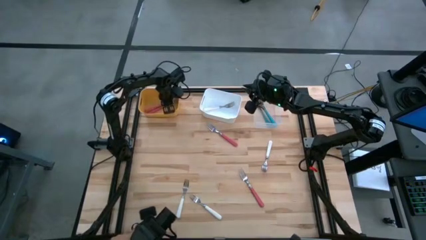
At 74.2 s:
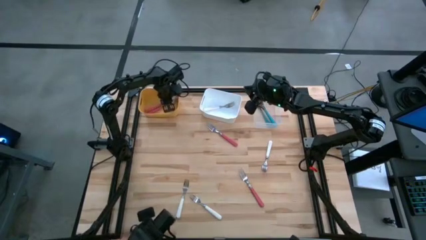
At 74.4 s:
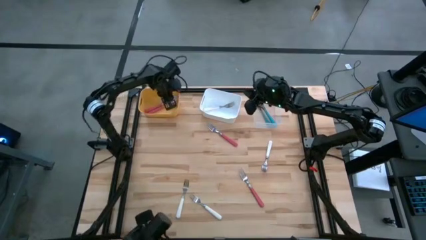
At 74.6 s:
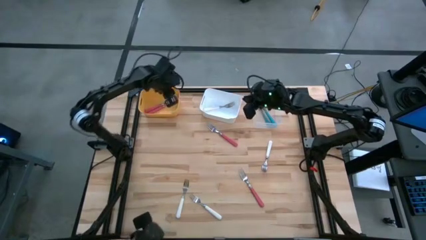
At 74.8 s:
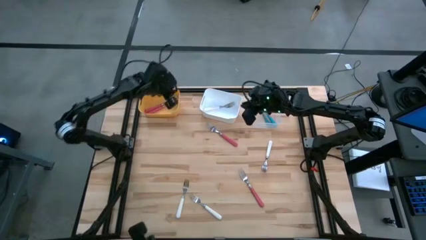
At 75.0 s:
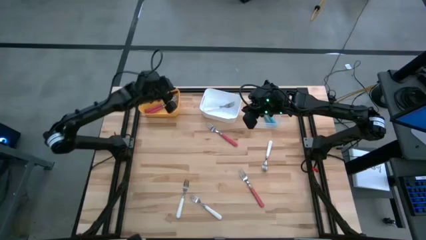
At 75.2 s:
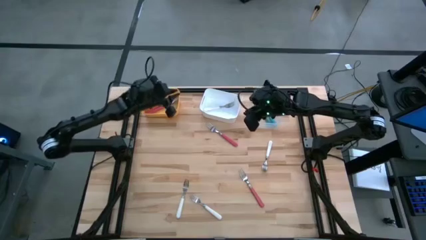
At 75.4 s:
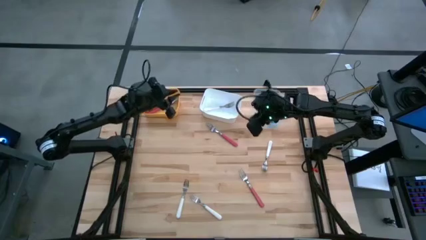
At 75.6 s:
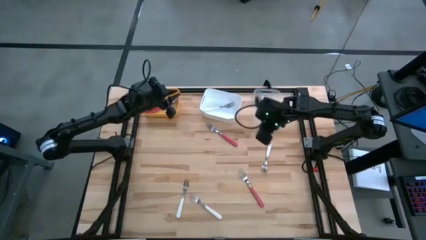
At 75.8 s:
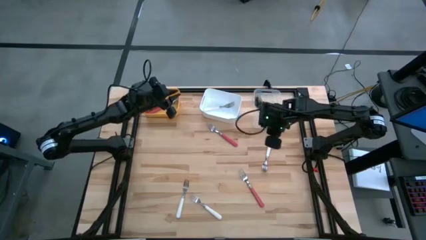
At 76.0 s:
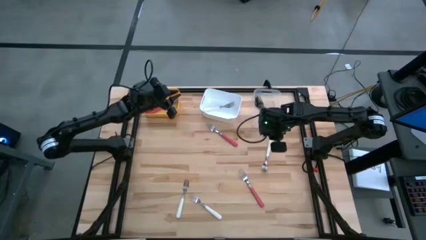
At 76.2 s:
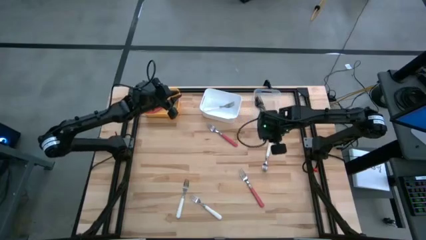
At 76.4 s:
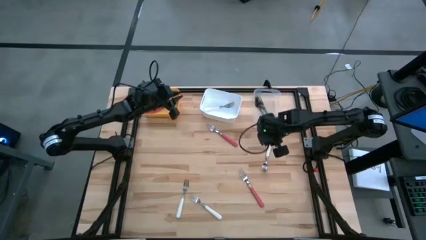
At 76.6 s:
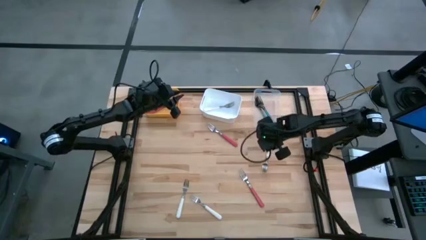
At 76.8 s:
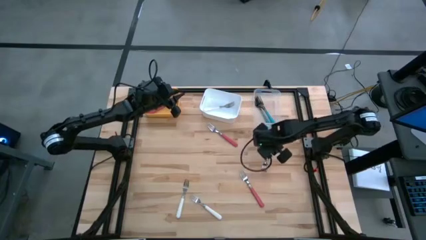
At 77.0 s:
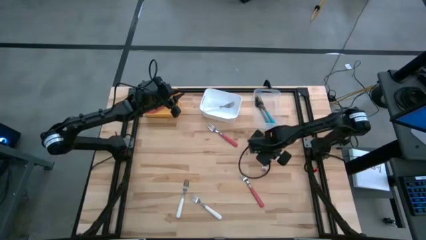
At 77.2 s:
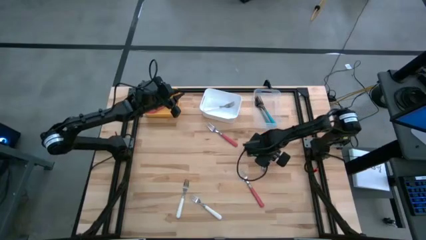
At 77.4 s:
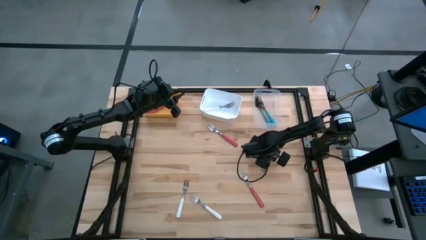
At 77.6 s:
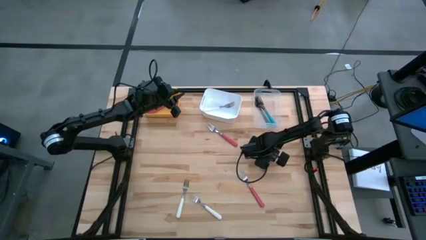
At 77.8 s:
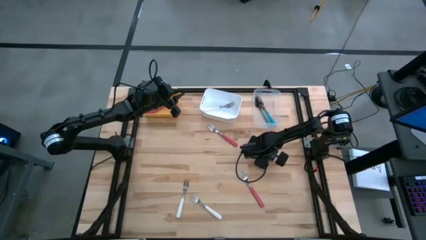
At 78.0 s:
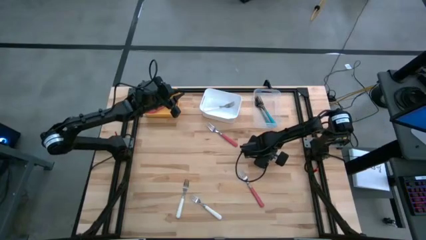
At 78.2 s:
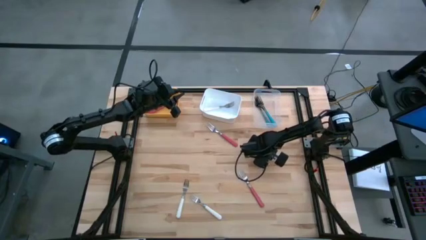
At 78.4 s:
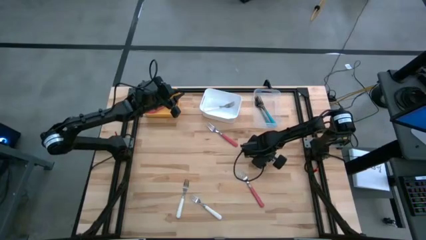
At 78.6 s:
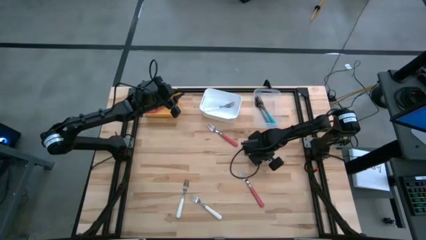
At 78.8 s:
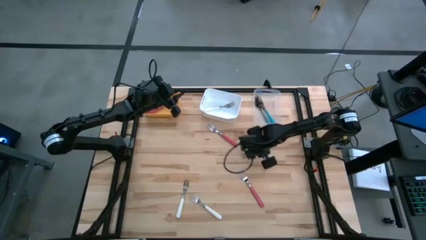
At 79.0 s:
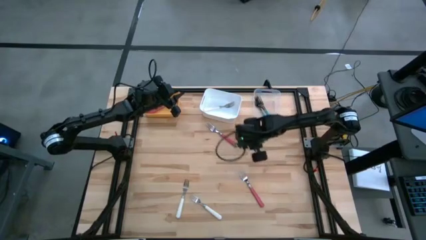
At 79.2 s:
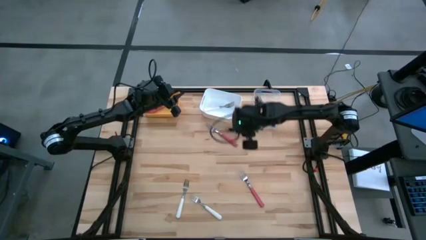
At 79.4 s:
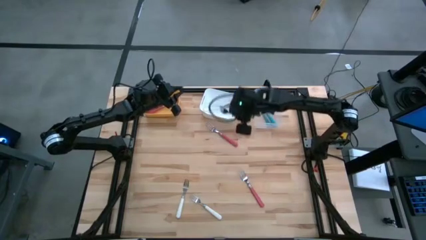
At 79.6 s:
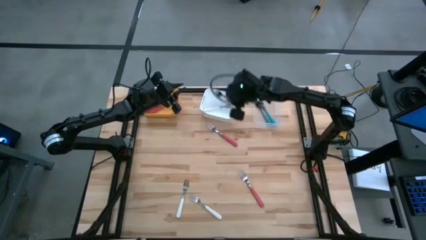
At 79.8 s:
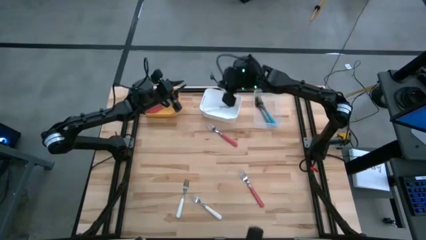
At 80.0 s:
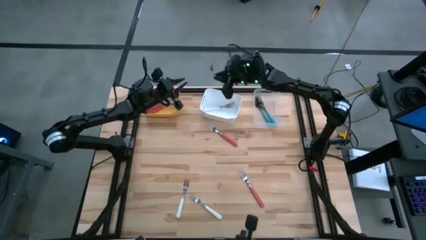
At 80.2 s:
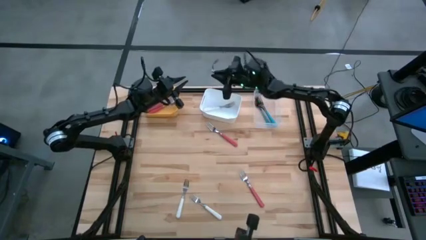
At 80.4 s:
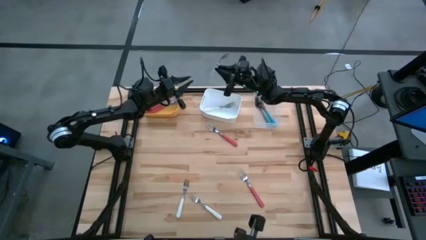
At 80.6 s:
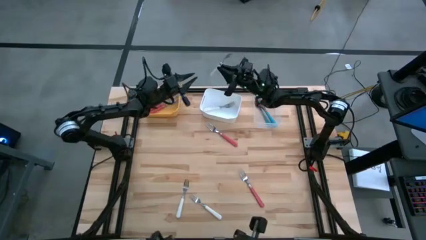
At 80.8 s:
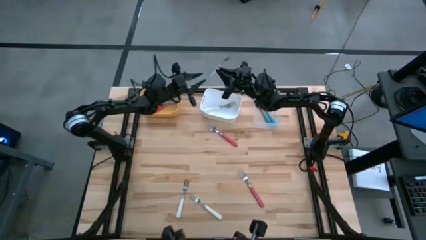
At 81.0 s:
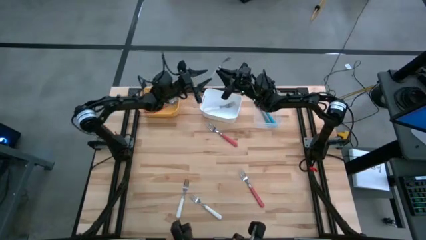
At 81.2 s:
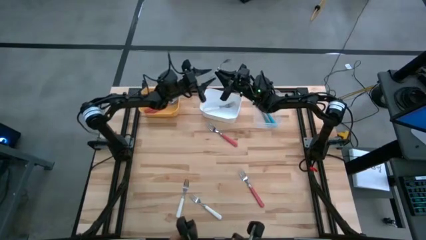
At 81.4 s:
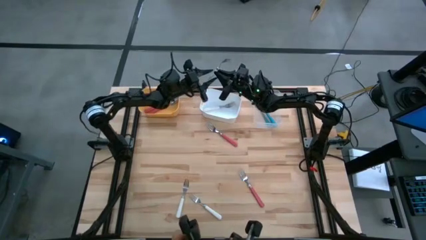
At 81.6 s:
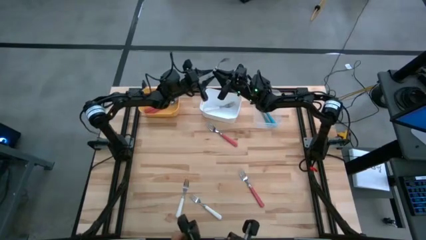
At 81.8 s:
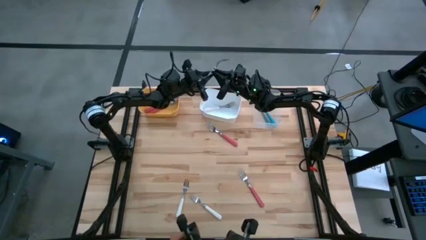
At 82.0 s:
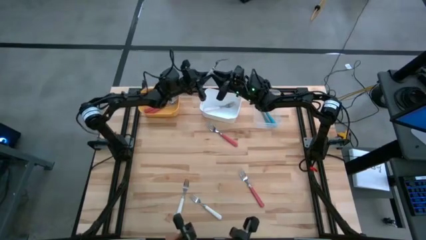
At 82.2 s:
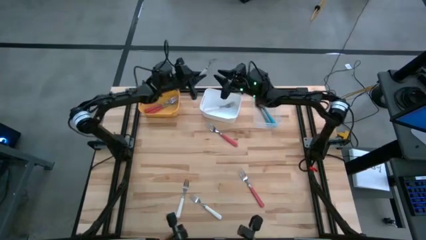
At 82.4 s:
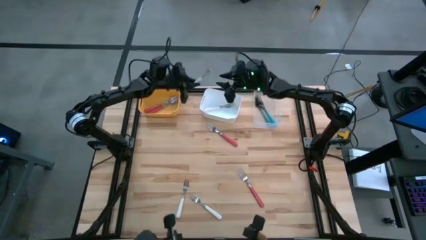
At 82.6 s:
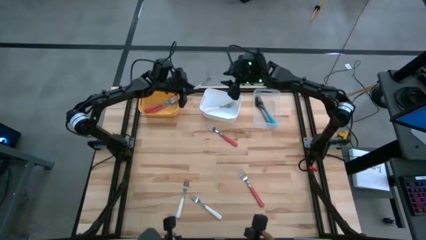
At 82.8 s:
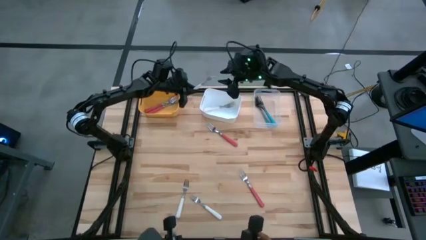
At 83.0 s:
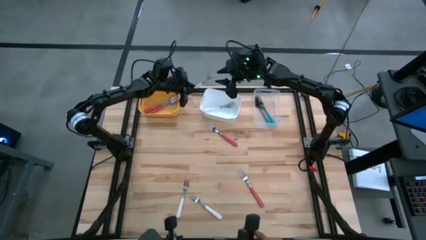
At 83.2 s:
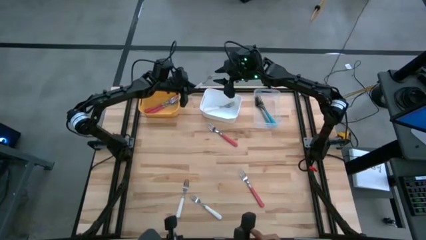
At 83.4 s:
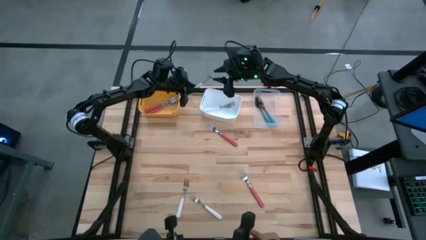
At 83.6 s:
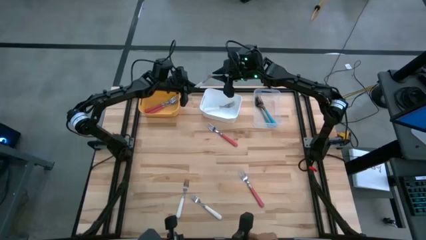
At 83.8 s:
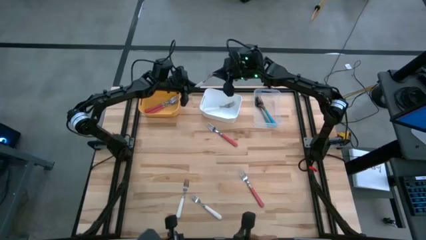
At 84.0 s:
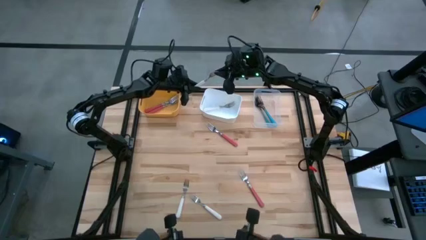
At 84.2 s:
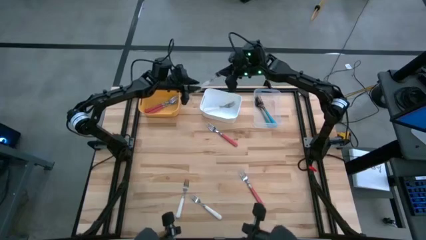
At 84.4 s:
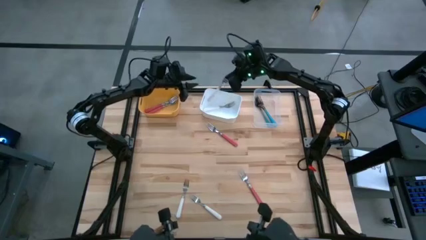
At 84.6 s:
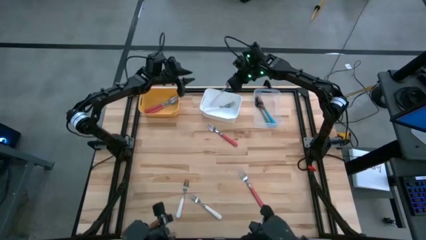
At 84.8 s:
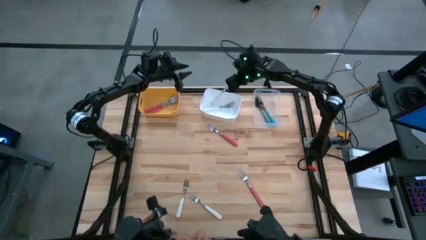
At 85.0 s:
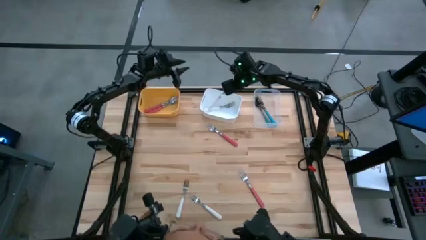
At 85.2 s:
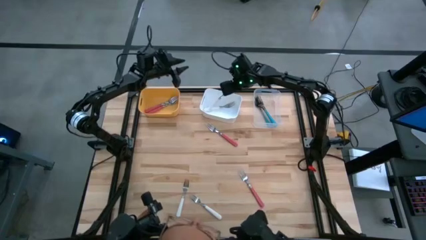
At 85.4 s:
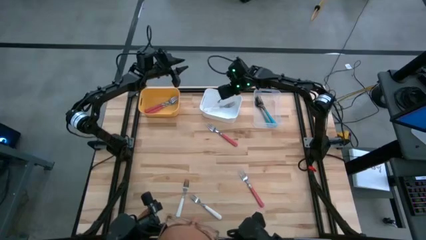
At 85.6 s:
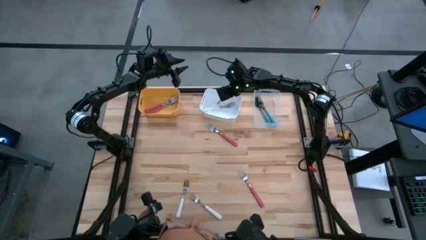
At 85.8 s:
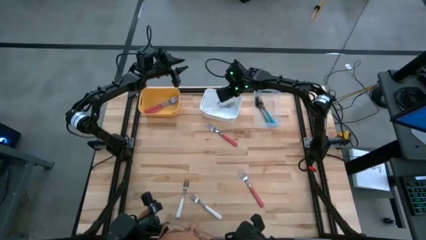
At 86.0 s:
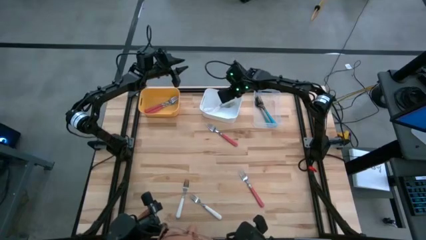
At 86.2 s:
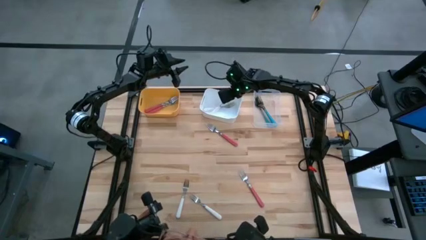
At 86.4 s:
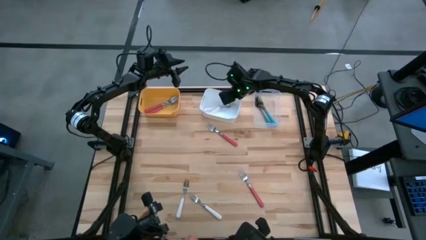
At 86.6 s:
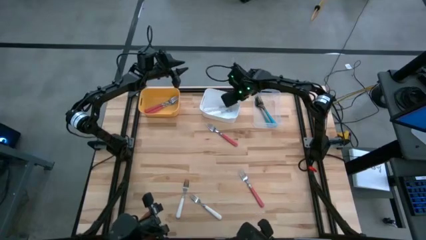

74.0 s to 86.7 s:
Task: Sort silverware by color (type)
Put the white fork into the white bin

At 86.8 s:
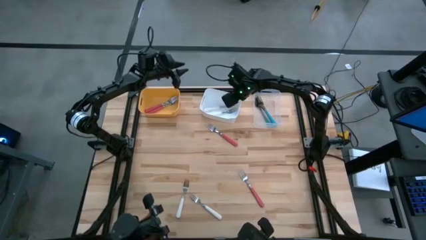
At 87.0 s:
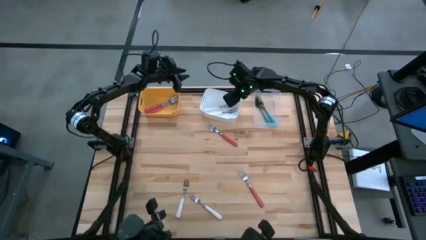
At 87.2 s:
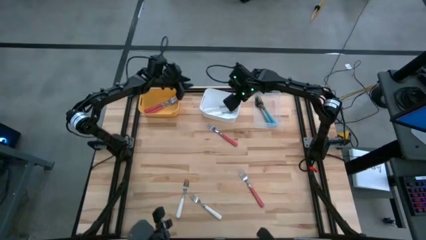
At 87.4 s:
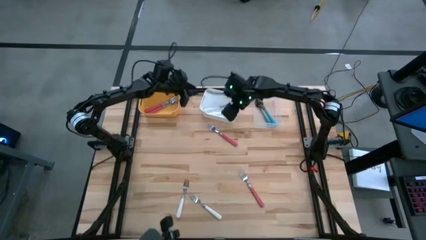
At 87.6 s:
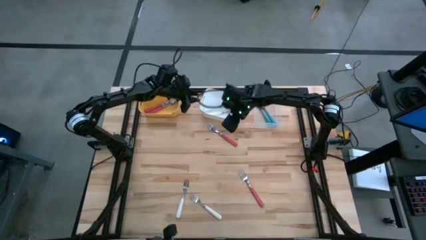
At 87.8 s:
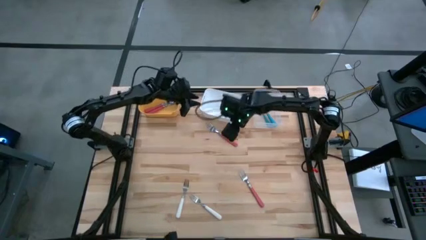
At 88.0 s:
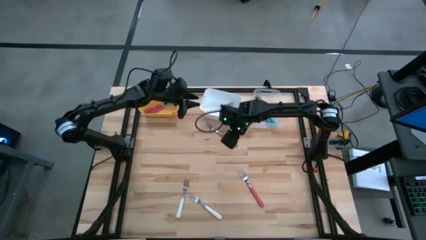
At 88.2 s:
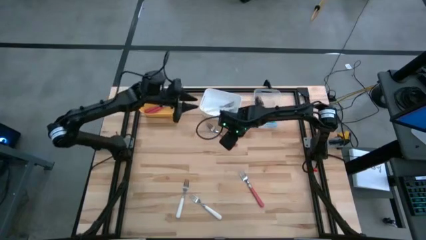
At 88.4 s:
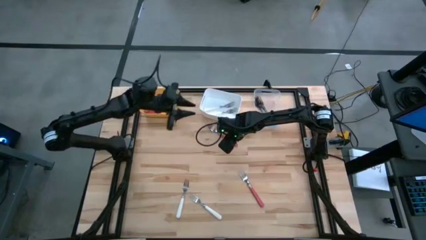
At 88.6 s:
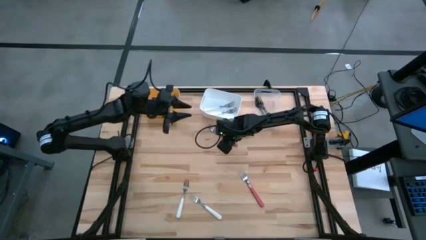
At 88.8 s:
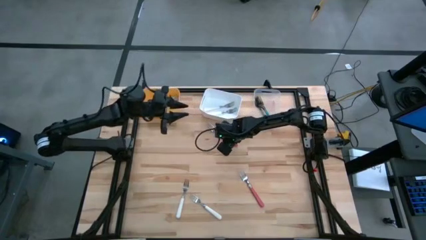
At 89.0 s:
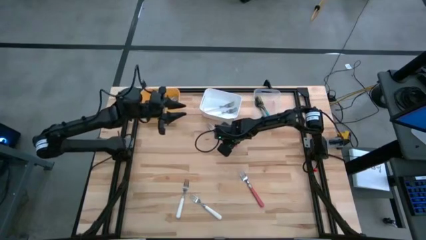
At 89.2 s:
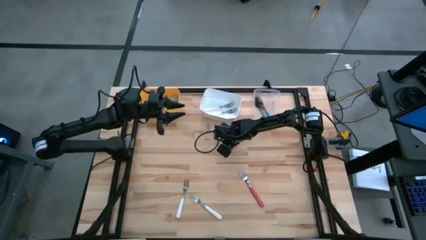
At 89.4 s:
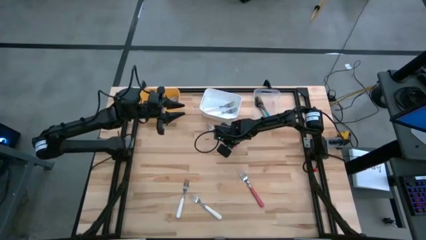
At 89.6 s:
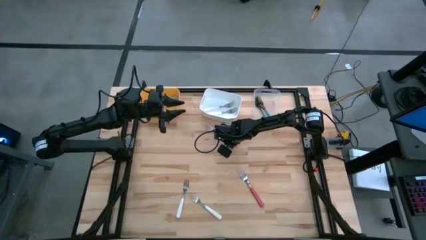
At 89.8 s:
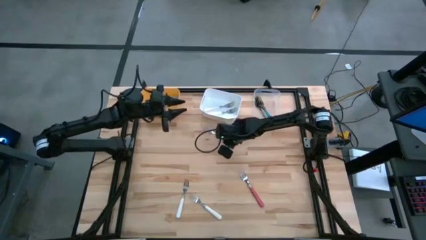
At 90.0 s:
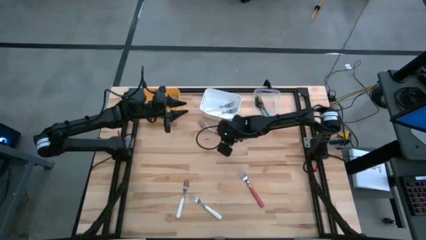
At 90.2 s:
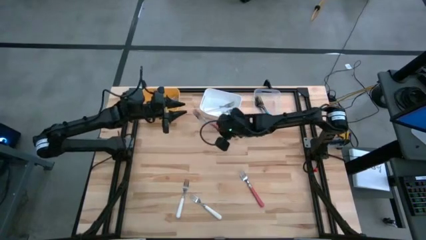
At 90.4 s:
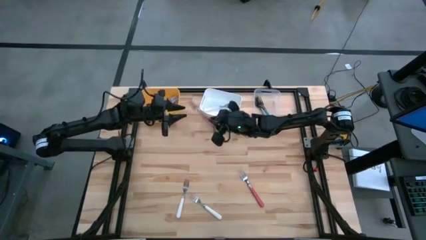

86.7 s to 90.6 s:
Put the pink fork into the yellow bin
